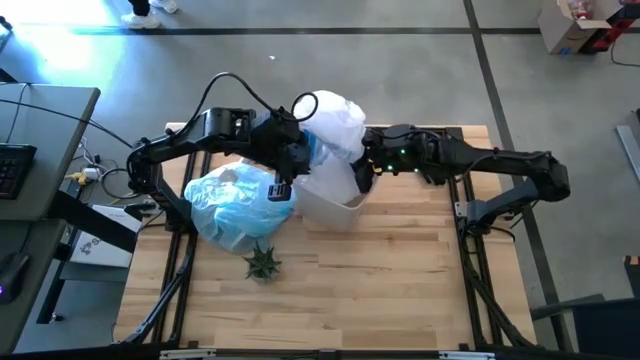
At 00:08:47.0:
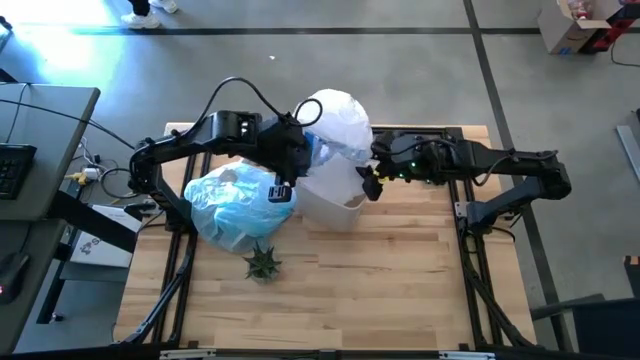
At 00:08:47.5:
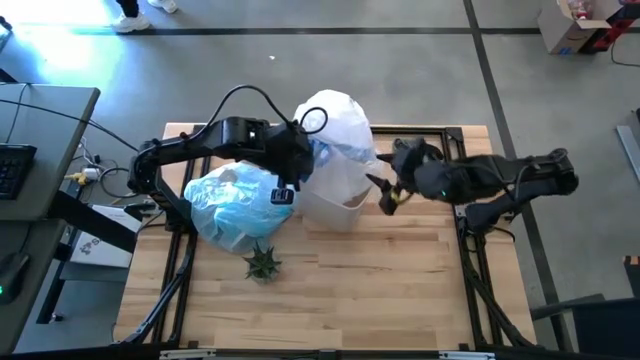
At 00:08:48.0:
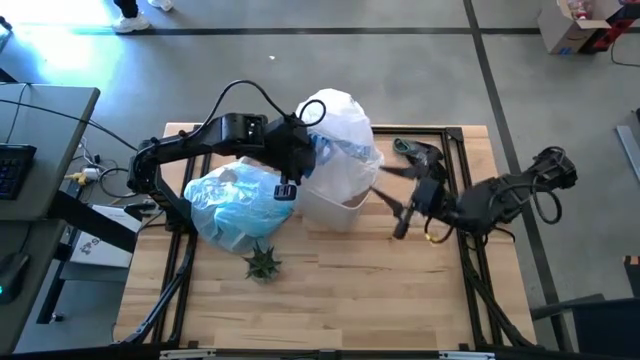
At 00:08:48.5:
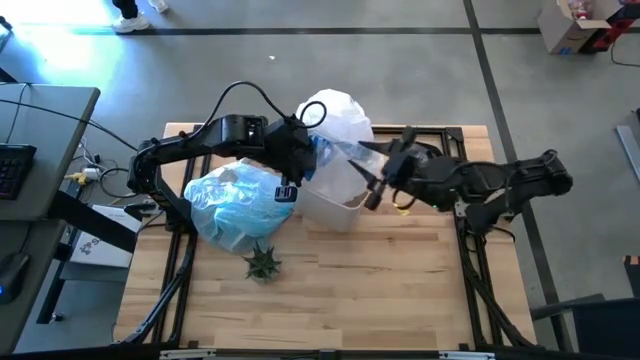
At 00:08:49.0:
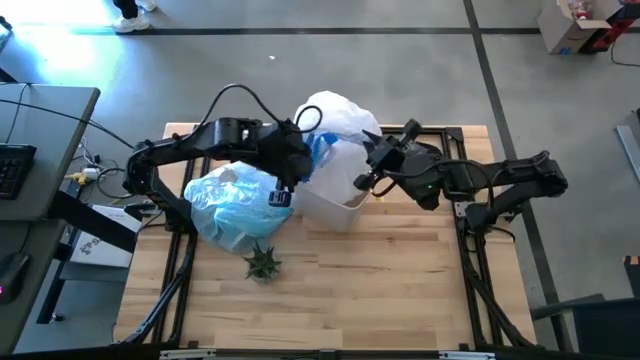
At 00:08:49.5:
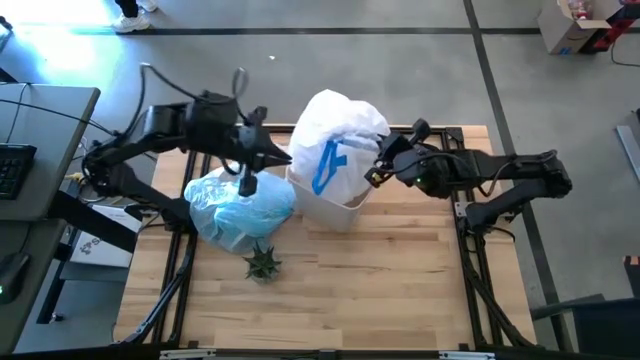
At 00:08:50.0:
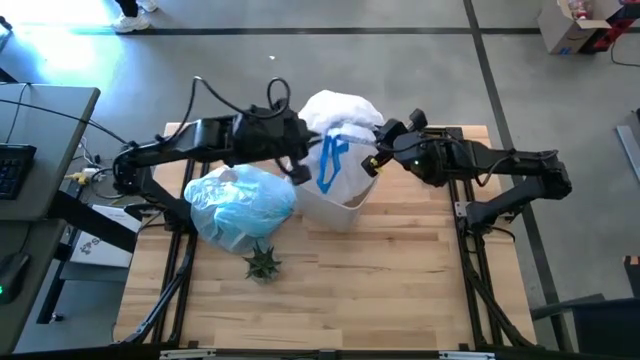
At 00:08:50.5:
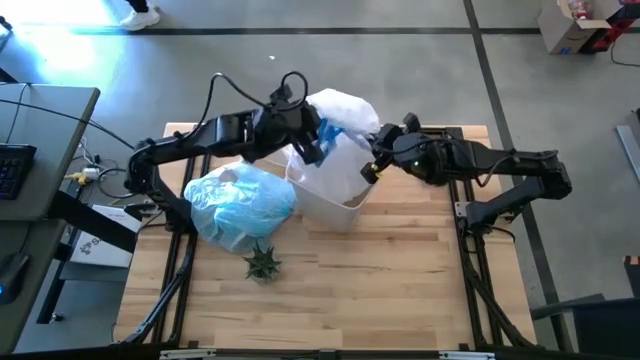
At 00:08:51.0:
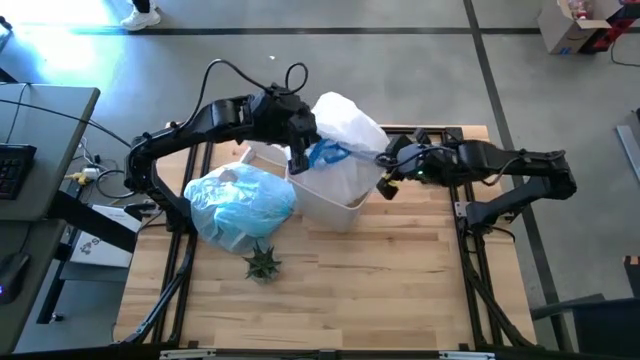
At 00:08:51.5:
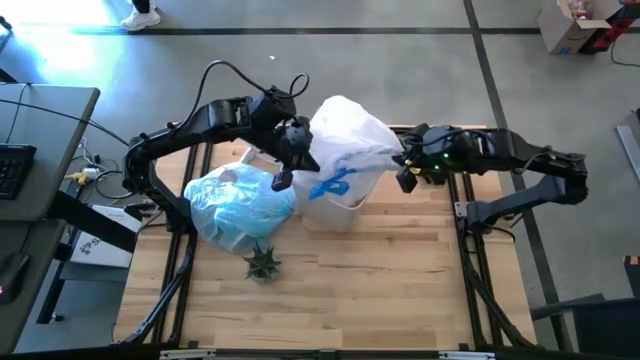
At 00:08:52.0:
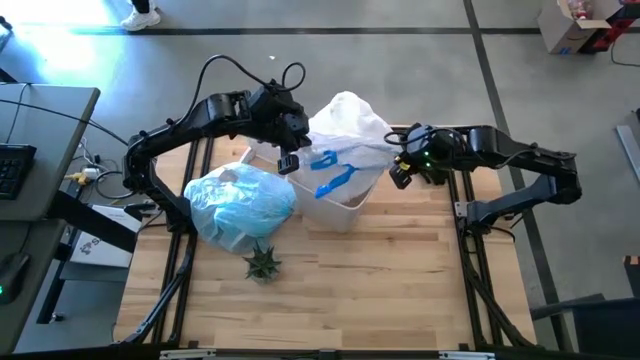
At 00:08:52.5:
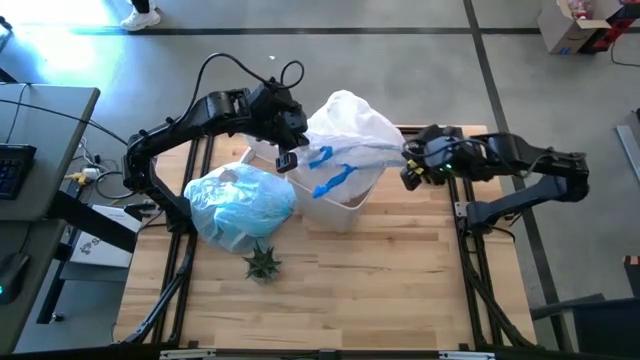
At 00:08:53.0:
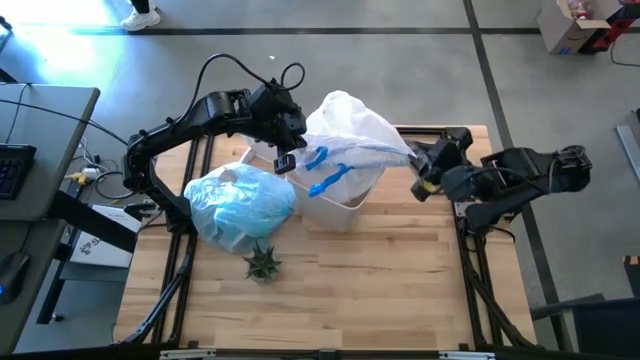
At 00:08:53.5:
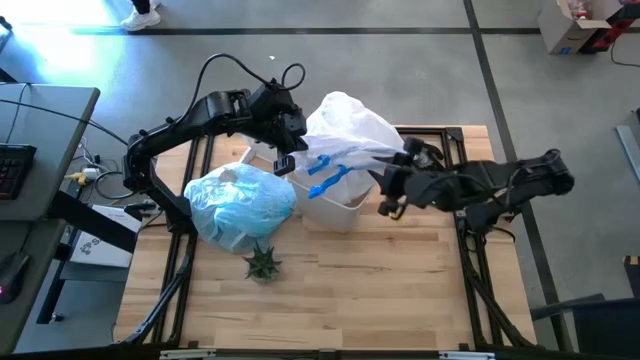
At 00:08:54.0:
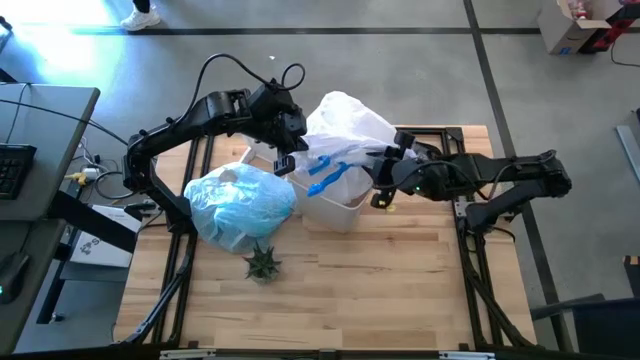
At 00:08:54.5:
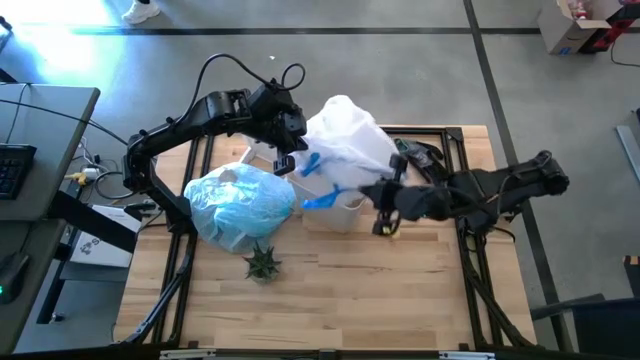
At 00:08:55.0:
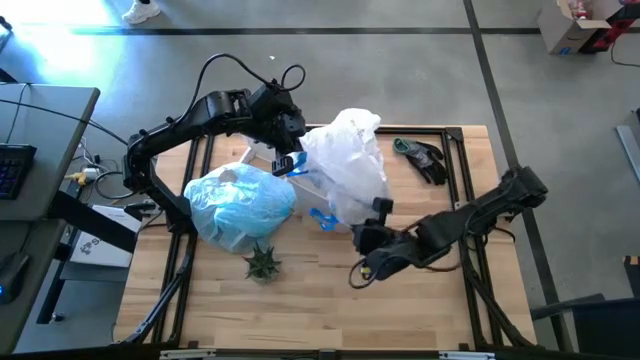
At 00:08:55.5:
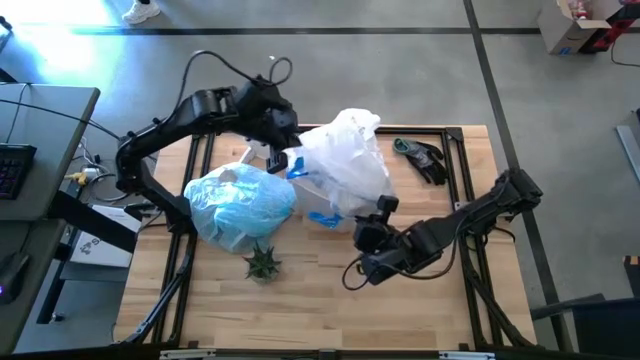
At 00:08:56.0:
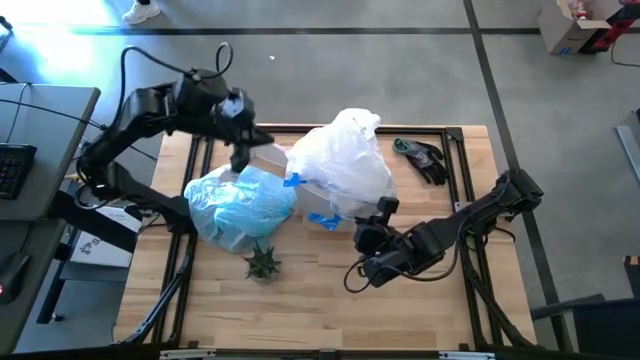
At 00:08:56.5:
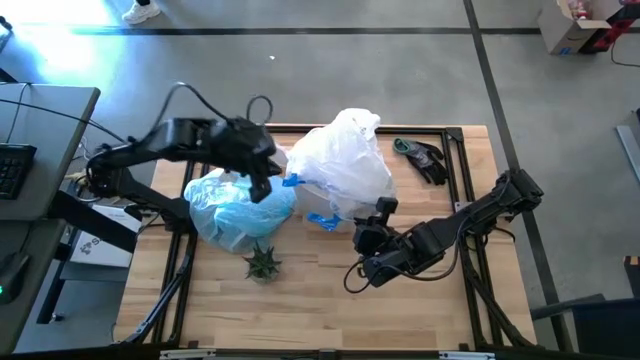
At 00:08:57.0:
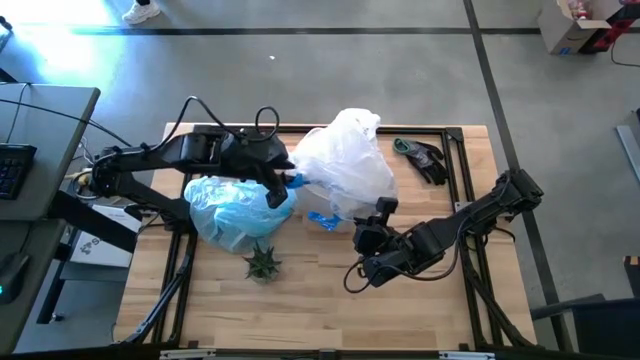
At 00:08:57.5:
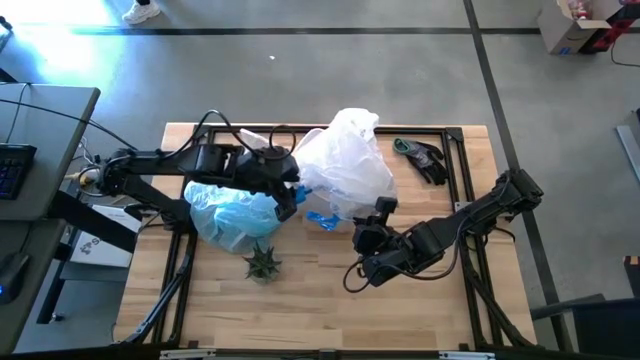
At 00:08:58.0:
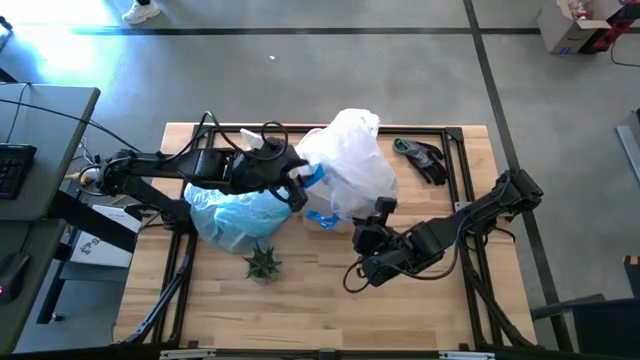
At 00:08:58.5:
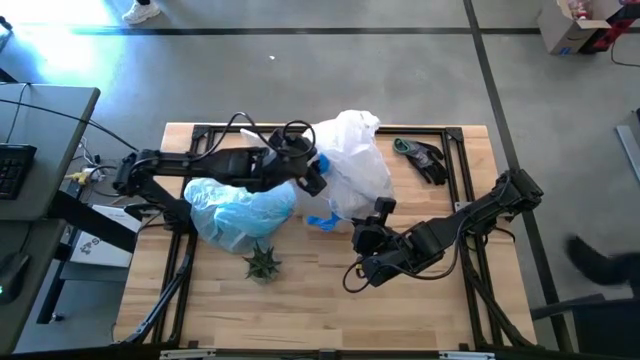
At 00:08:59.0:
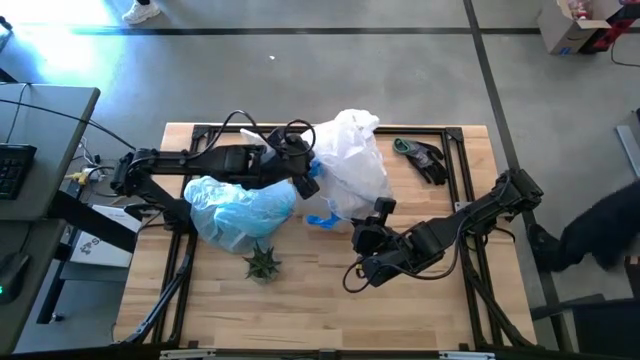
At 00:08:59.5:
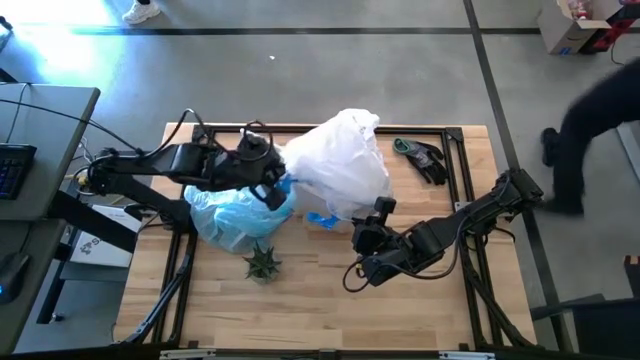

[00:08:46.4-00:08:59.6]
Task: place trash/remove bag and relplace
Insert the new trash bag into the trash bin

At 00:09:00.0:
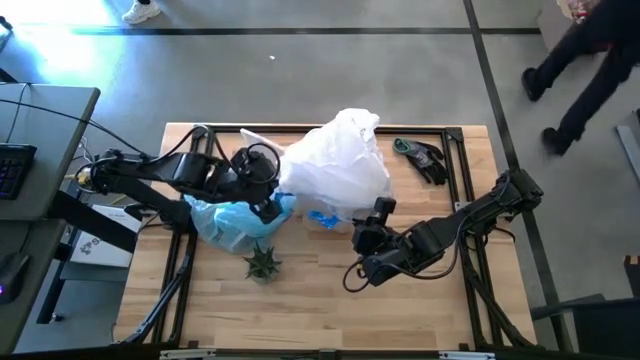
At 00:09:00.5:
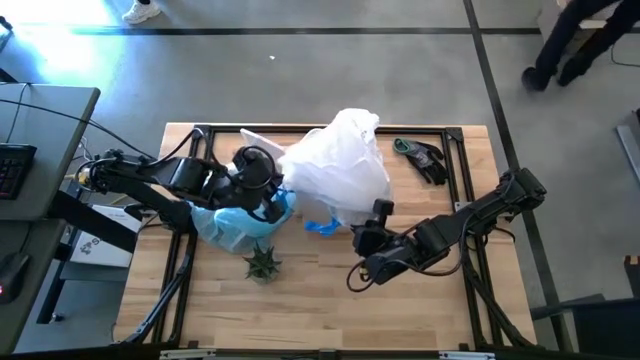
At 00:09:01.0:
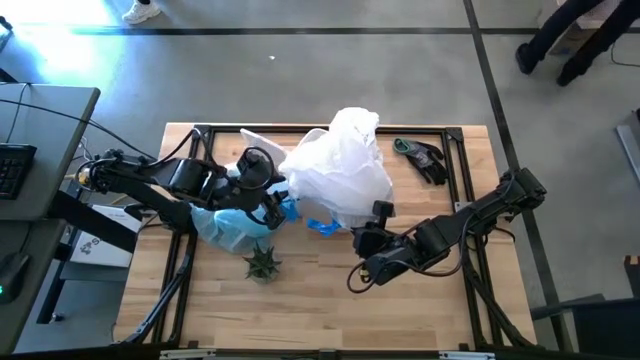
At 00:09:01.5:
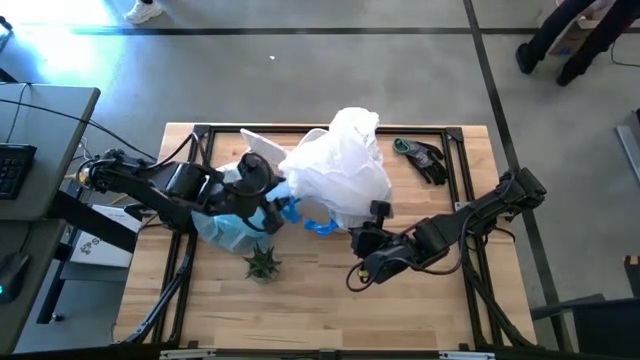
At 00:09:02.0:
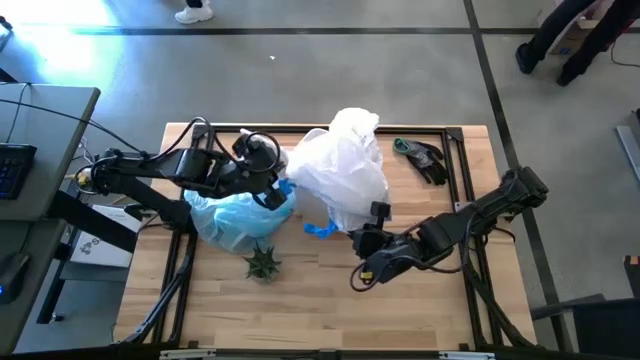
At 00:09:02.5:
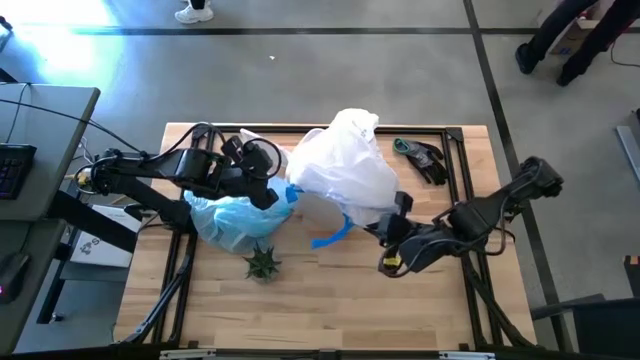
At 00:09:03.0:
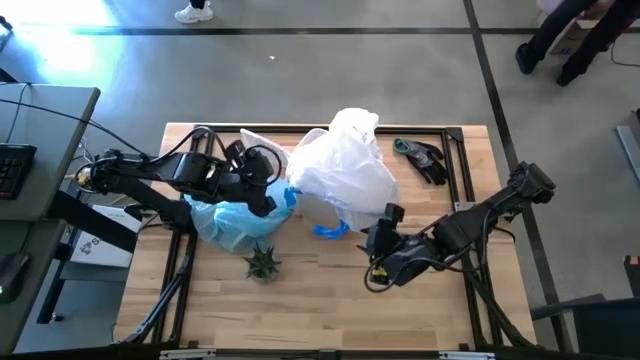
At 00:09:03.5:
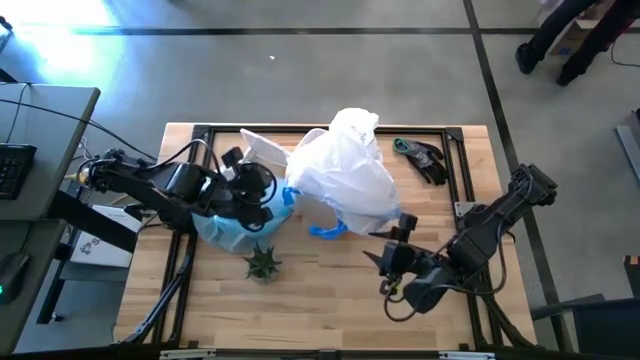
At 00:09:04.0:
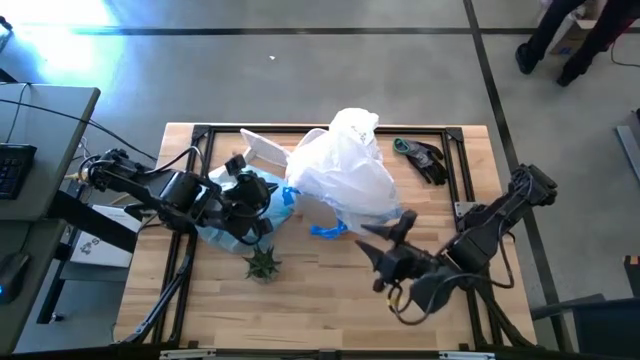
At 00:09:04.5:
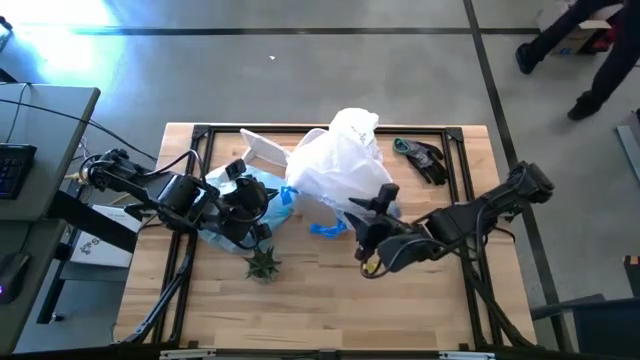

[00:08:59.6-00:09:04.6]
Insert the new trash bag into the trash bin

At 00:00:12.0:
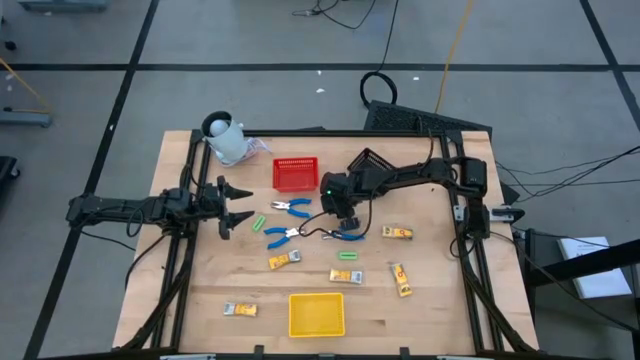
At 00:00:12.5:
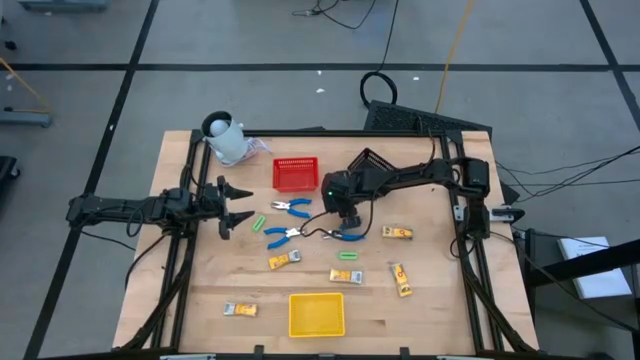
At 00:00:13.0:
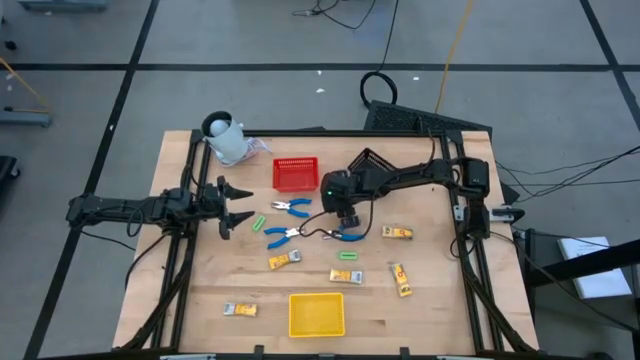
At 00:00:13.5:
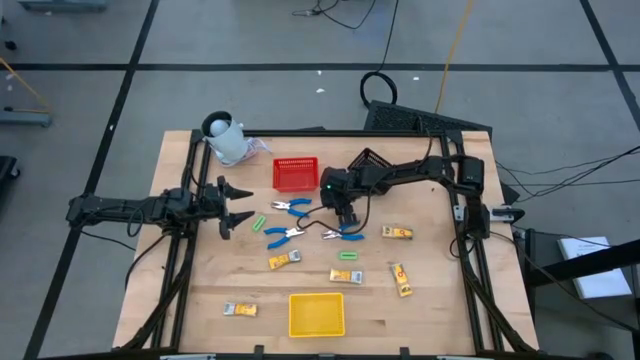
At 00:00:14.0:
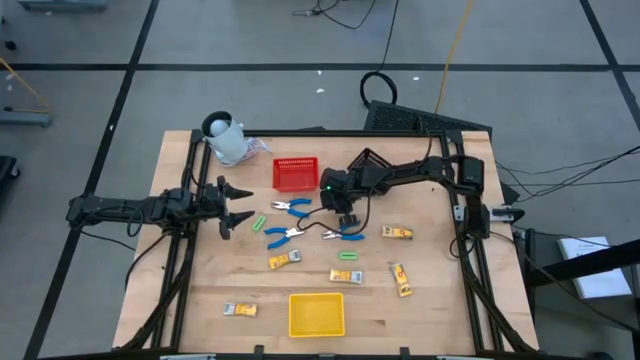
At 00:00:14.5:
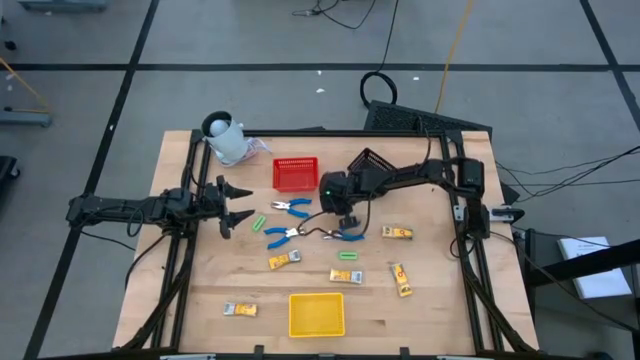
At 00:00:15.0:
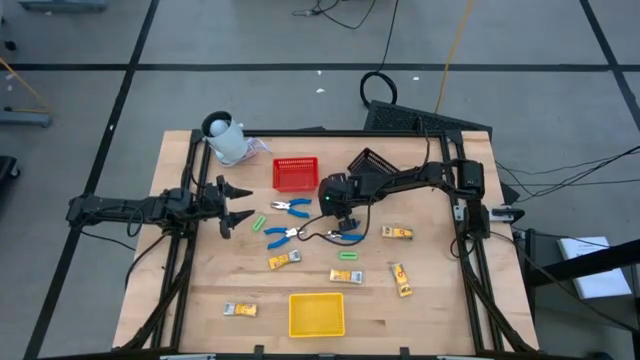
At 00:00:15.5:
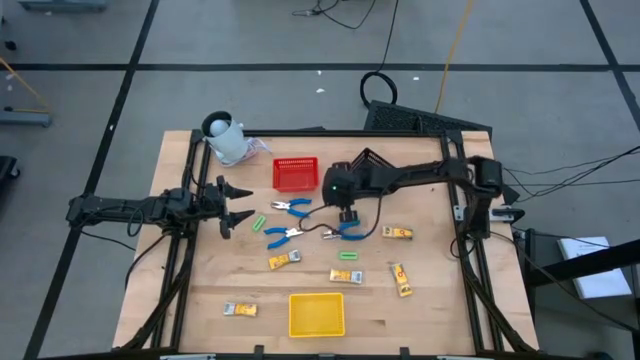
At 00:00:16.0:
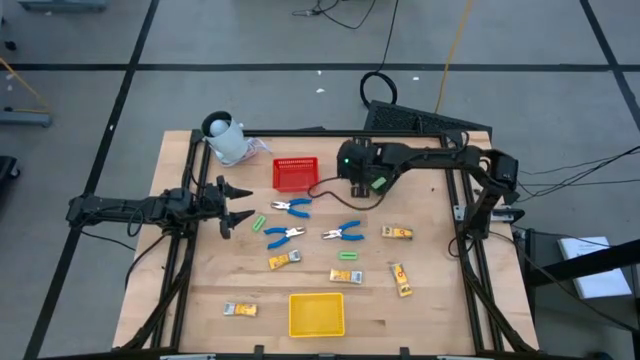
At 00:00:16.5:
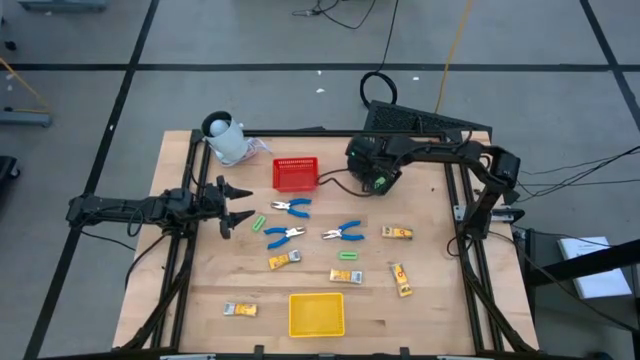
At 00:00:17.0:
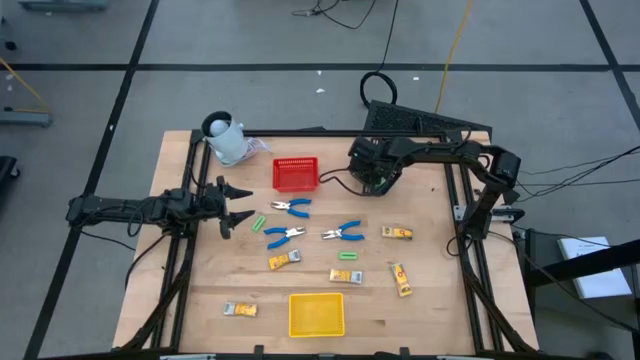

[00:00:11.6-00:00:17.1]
Task: Pick & Place School Supplies
Put the green eraser into the black bin
